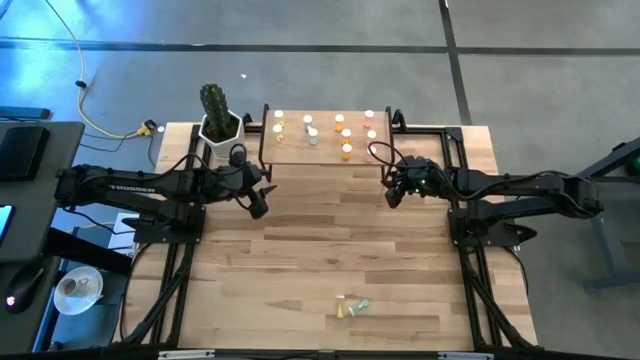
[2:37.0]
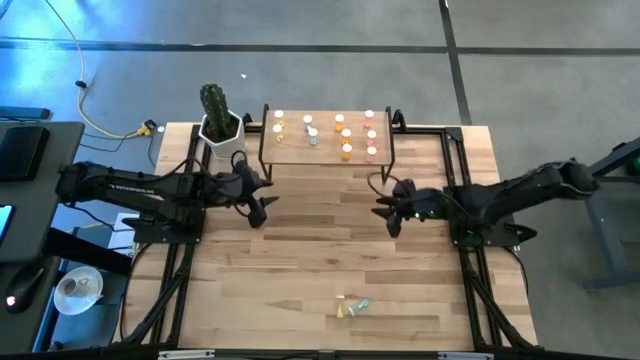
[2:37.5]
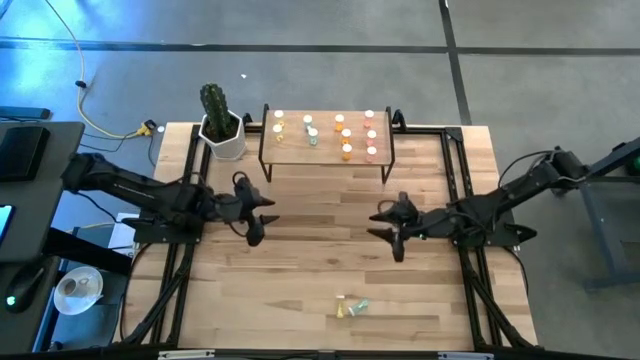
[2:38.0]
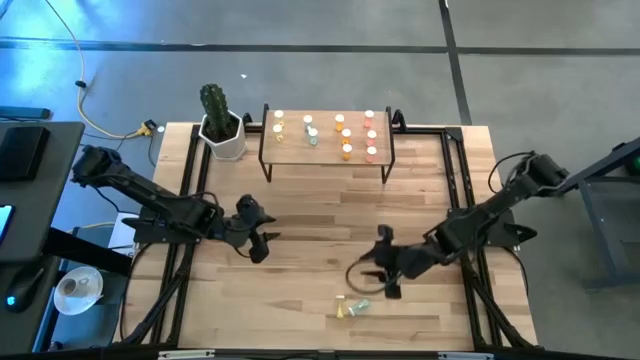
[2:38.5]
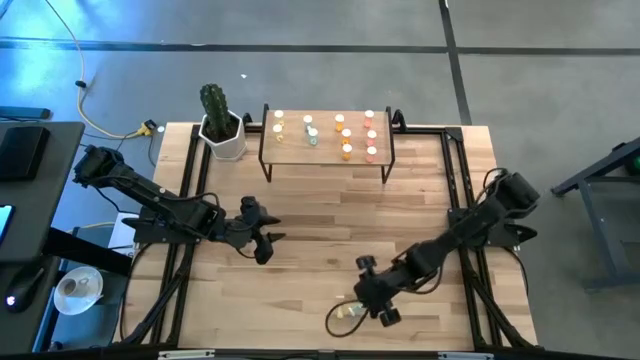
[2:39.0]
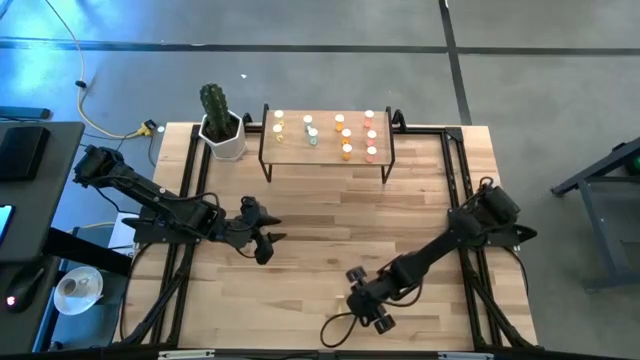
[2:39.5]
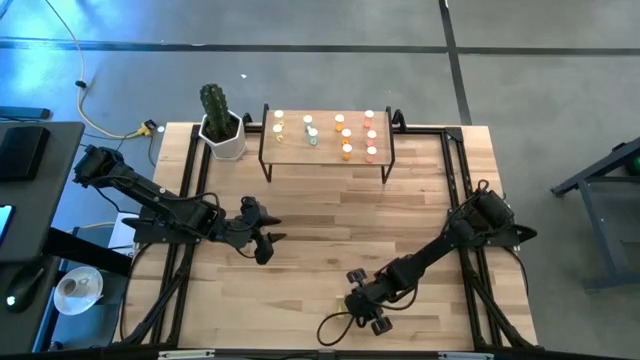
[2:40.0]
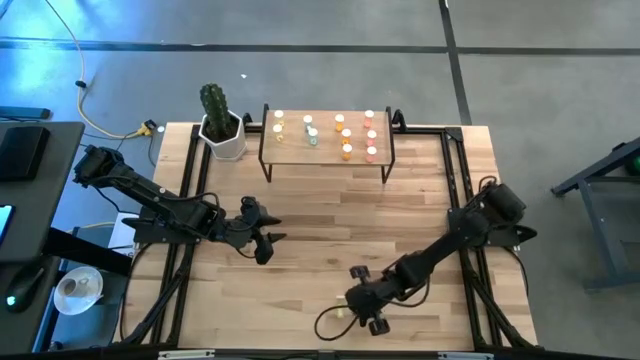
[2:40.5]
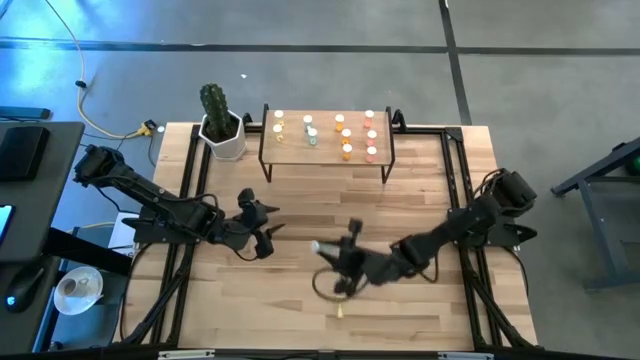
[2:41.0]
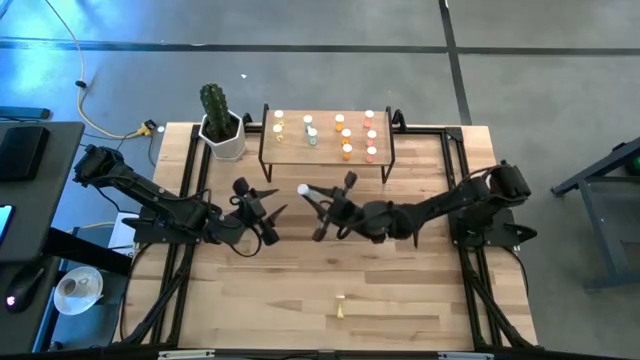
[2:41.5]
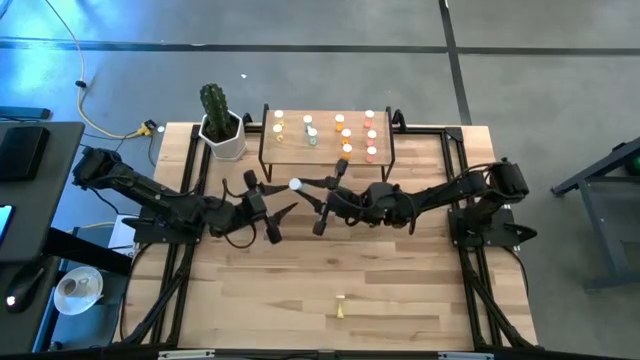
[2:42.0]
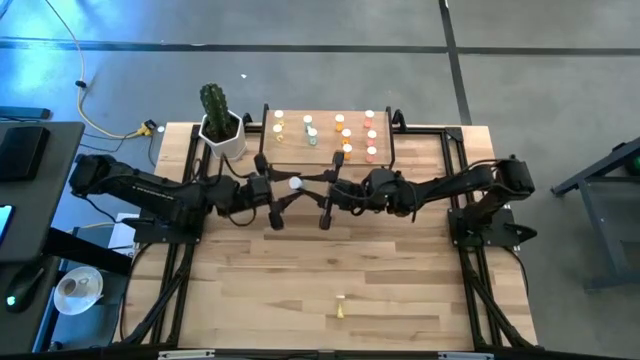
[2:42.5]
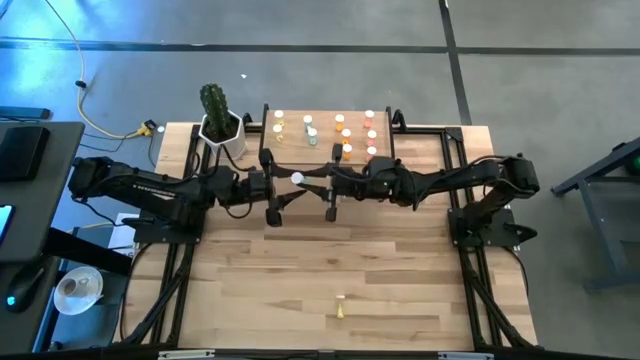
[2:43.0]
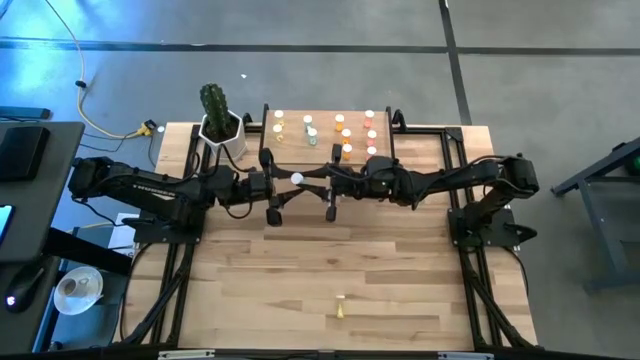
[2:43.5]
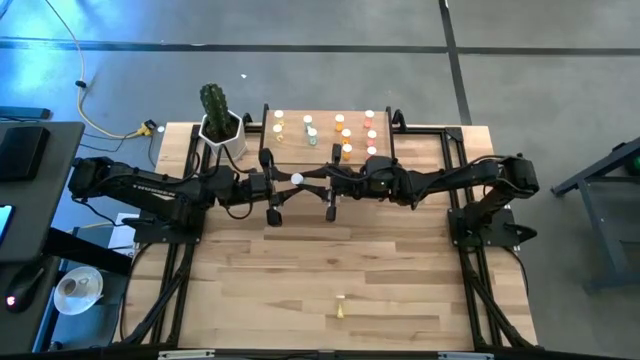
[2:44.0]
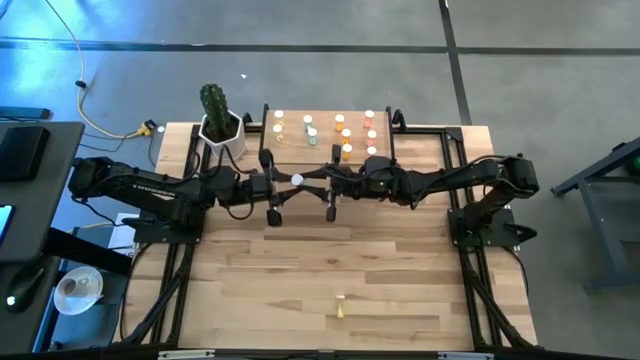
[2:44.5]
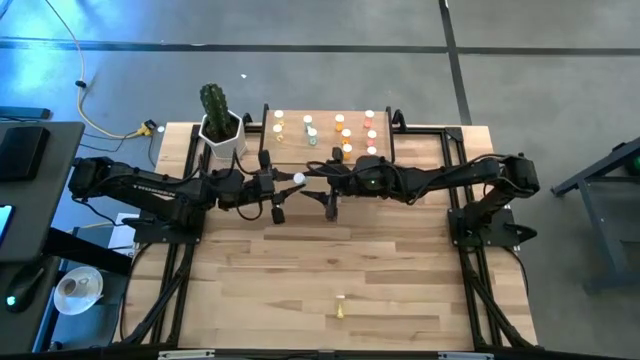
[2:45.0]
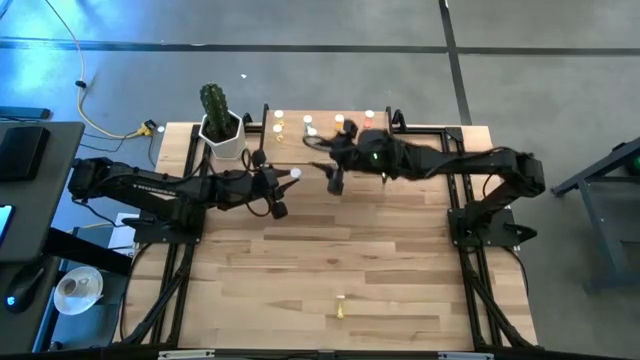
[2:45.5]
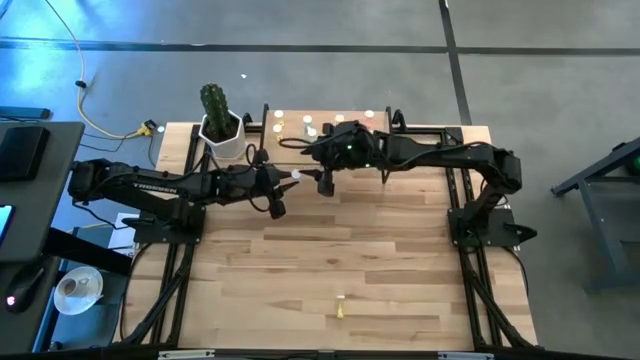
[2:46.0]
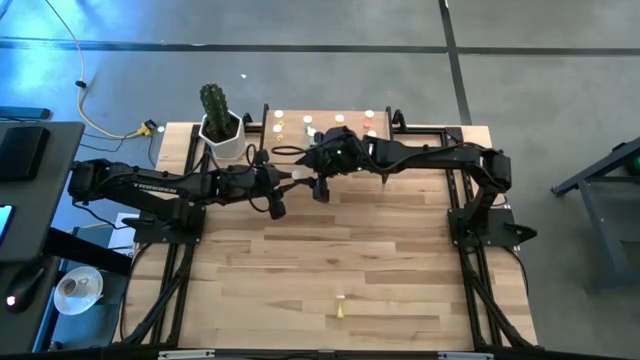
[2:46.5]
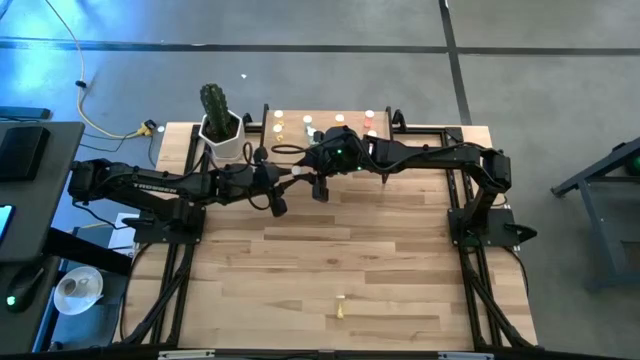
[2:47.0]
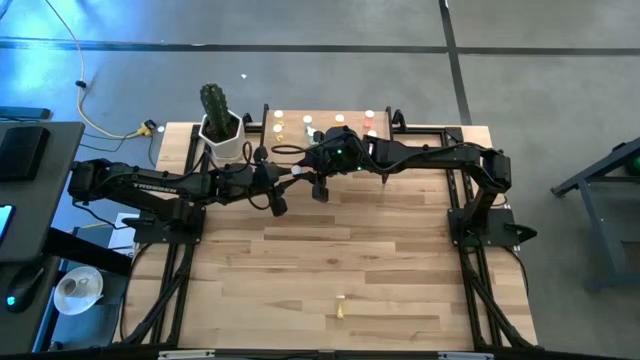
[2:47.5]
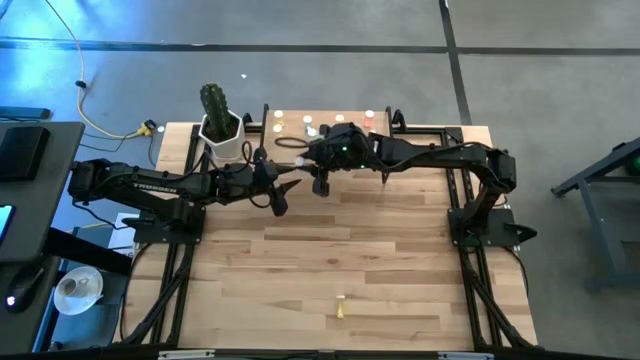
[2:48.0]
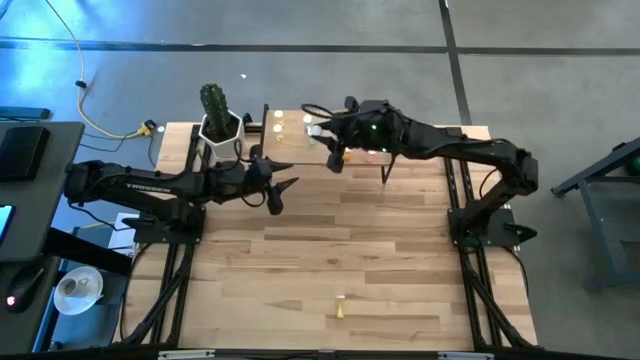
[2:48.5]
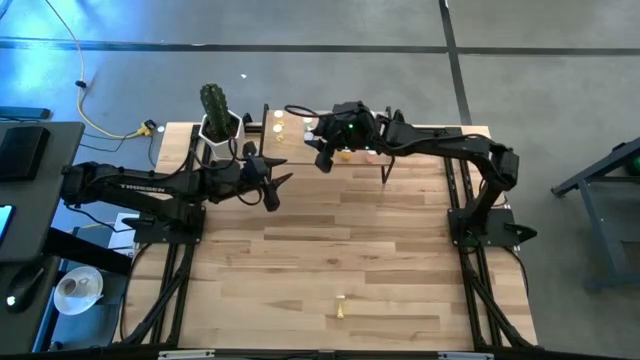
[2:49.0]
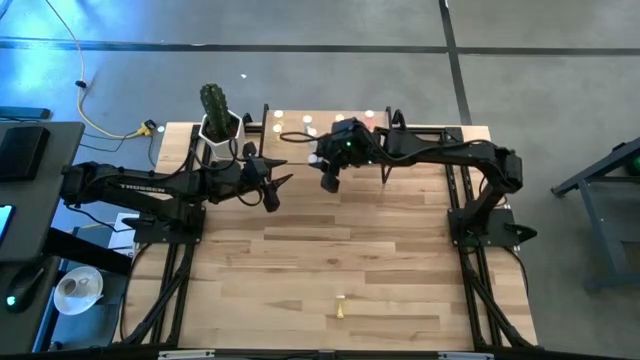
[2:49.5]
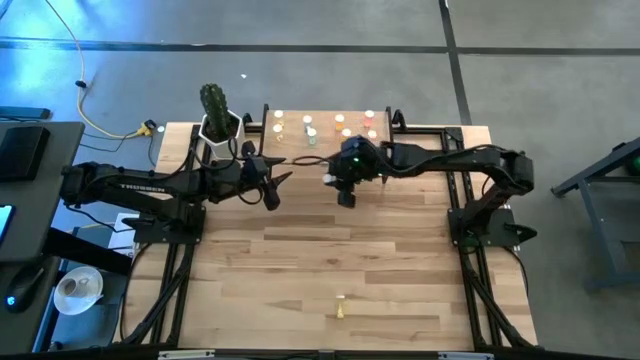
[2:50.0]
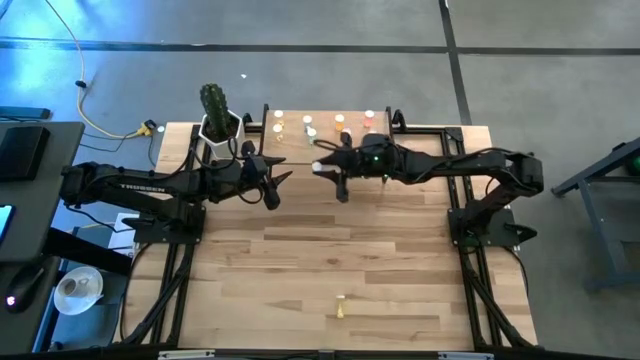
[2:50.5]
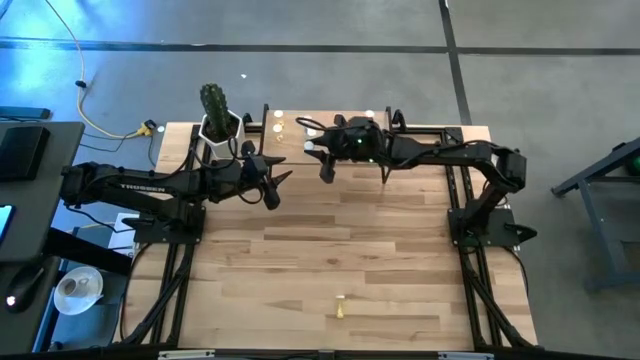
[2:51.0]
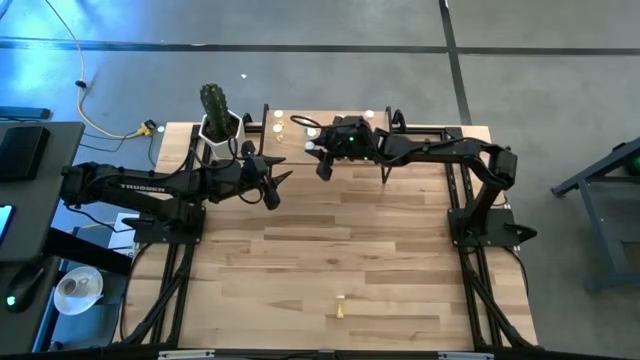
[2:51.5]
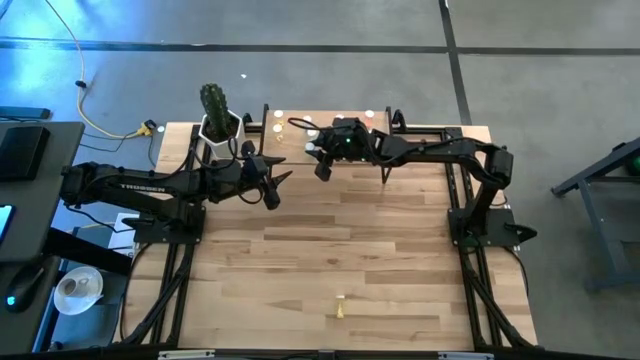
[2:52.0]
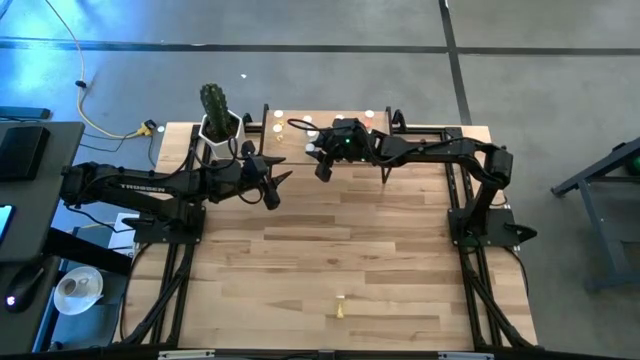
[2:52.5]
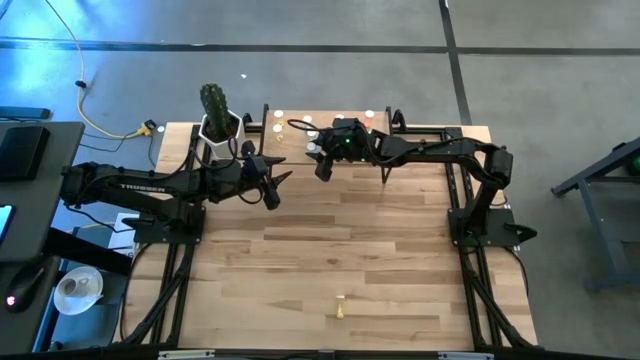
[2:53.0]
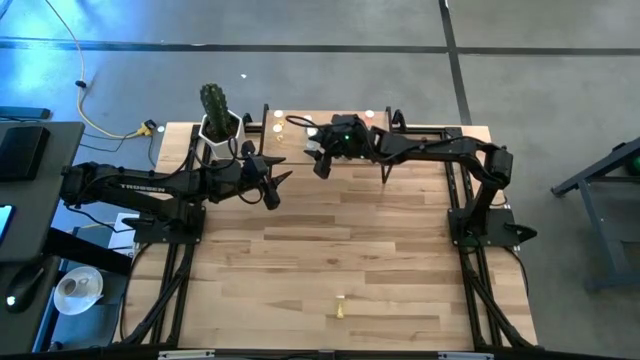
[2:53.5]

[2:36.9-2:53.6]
Task: Pick and place medicine bottles onto shelf by color
Put the blue pill bottle on the shelf aligned with other blue pill bottles

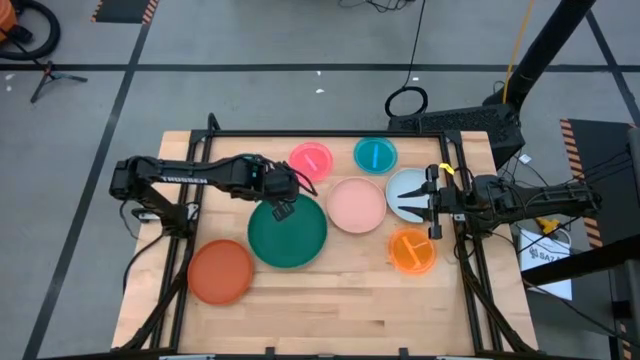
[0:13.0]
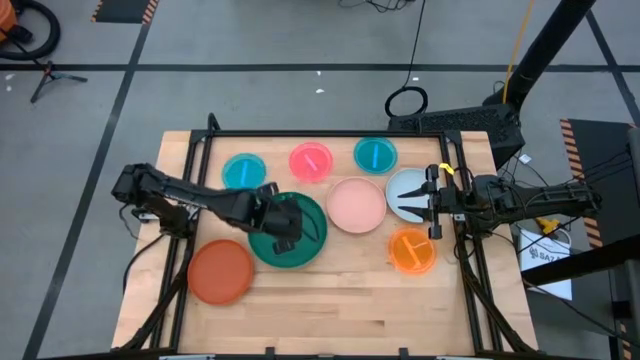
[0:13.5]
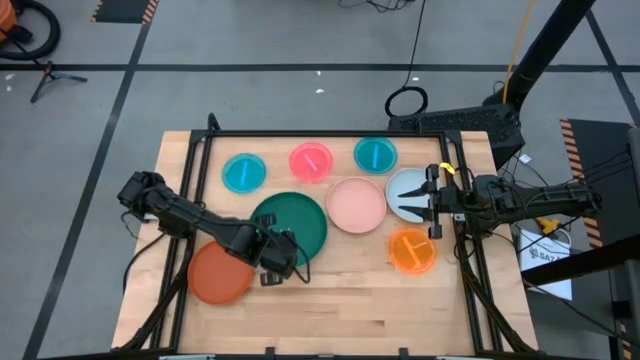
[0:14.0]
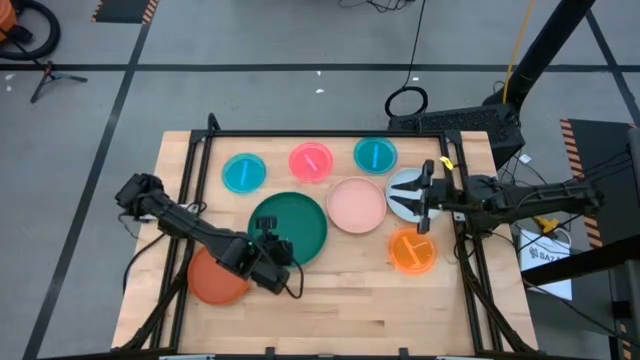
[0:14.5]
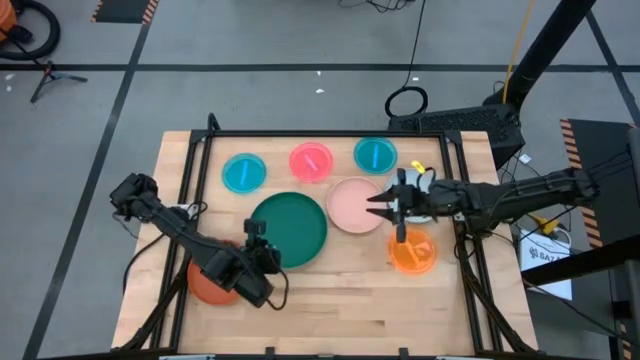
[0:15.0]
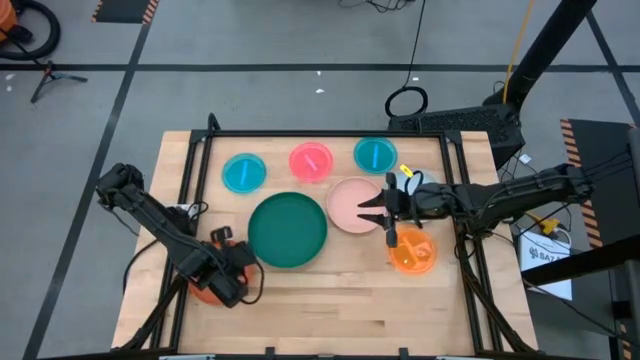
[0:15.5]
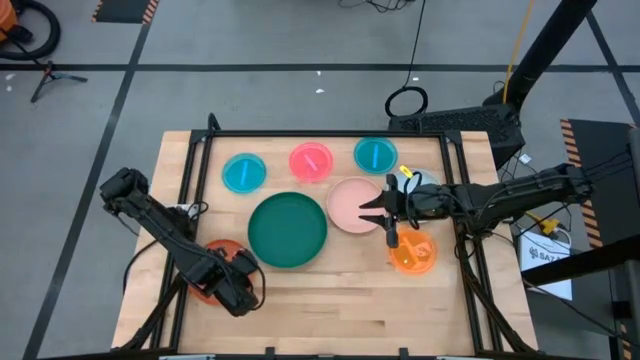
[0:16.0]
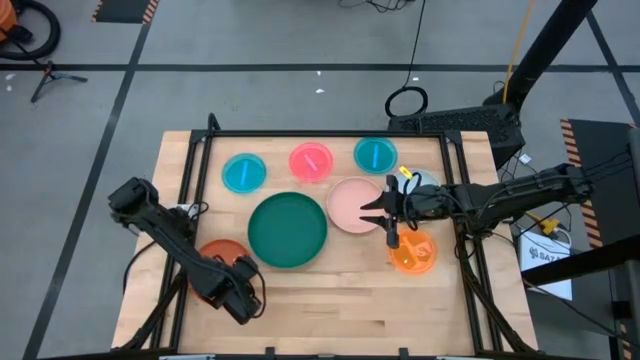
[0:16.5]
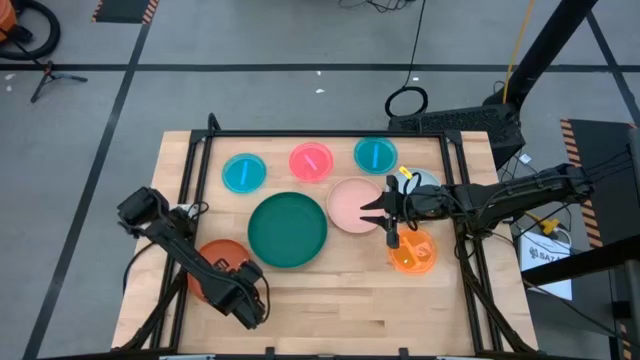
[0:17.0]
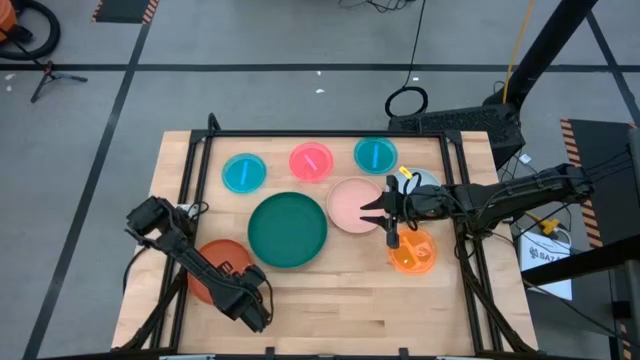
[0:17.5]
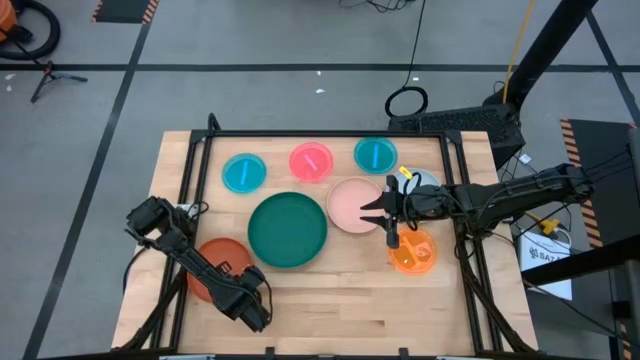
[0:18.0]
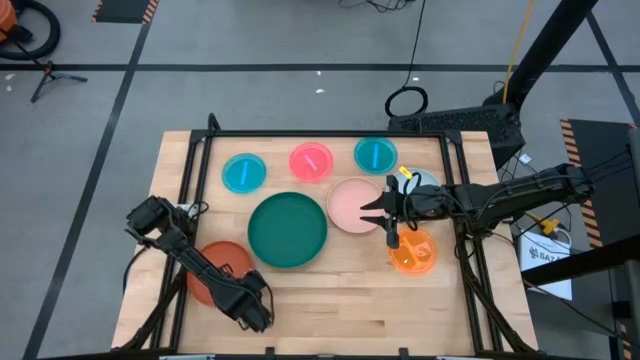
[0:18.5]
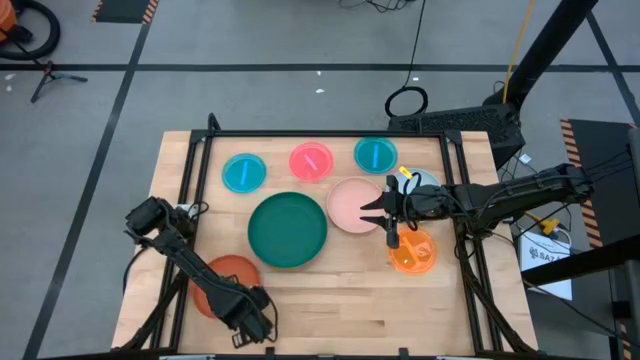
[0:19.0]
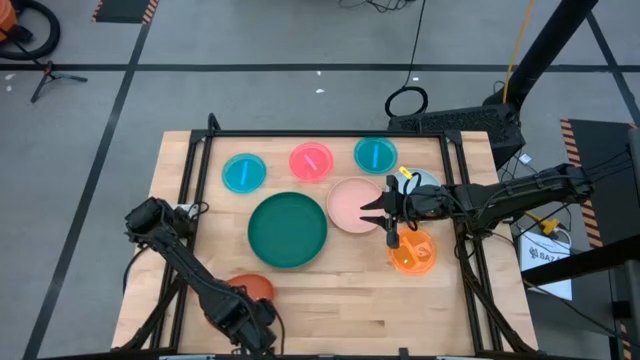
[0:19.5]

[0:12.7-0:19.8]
Task: Stack plastic plates
Stack the orange plate on top of the dark green plate
